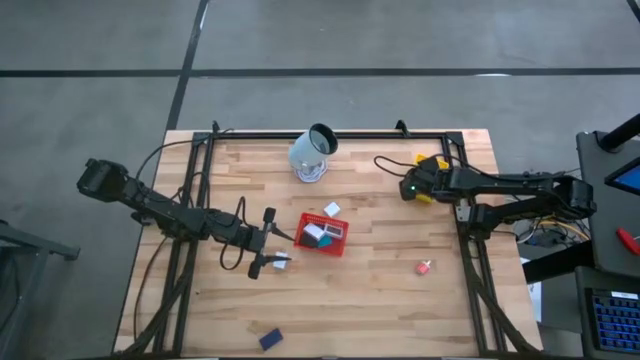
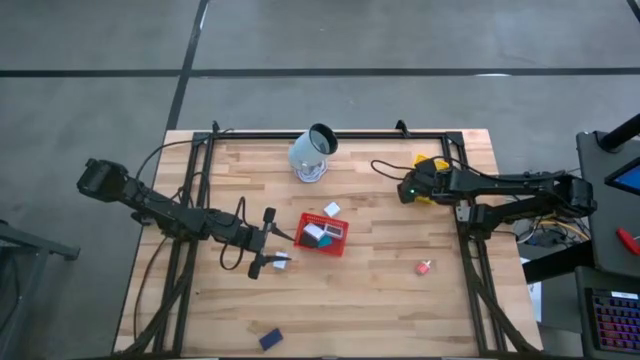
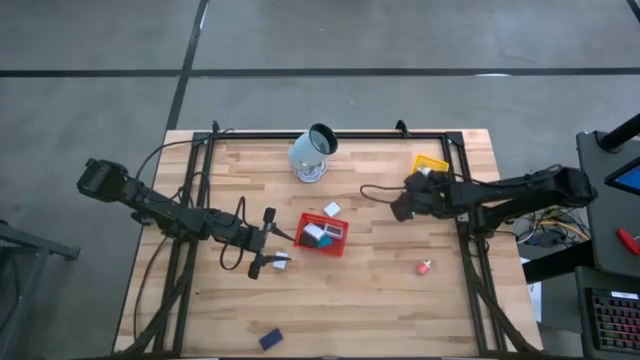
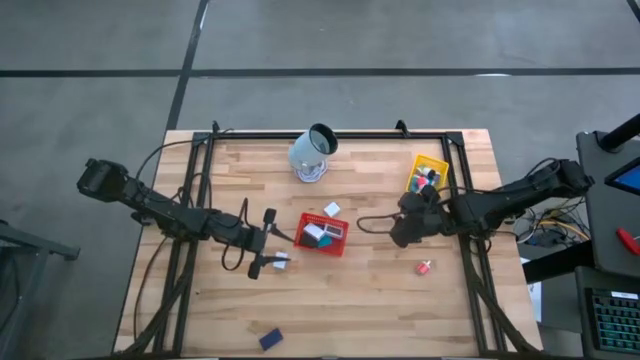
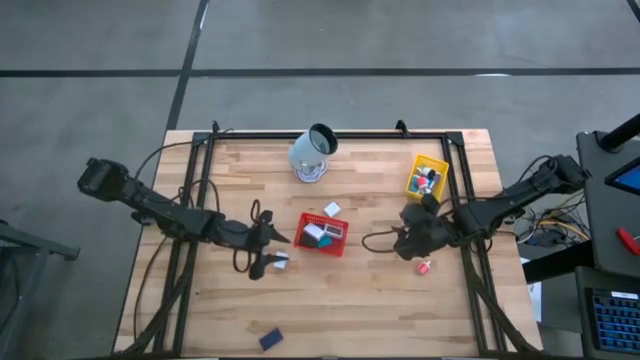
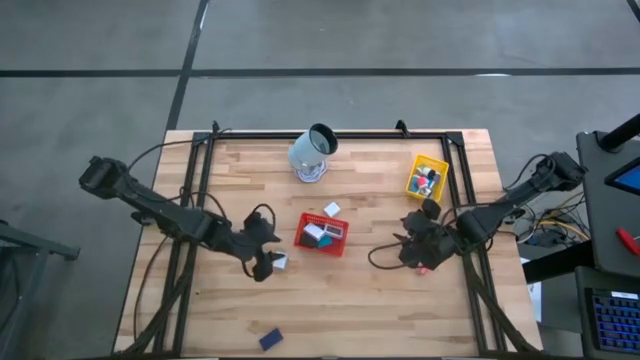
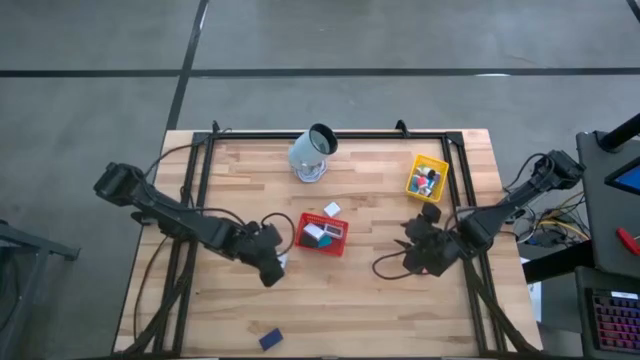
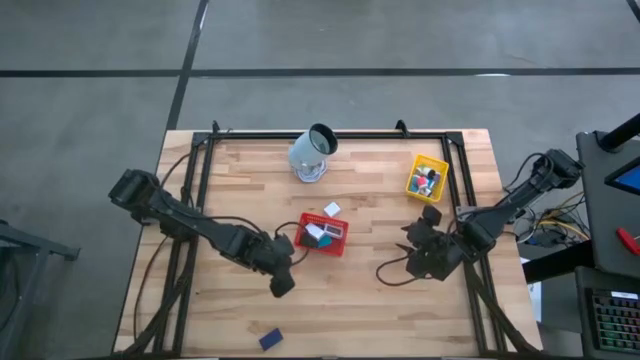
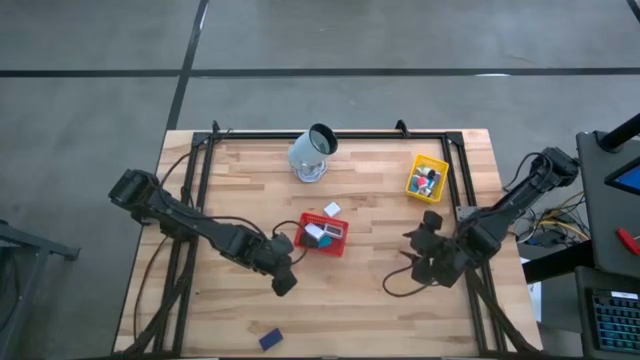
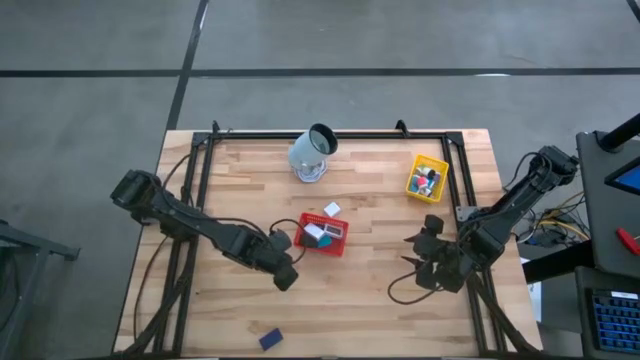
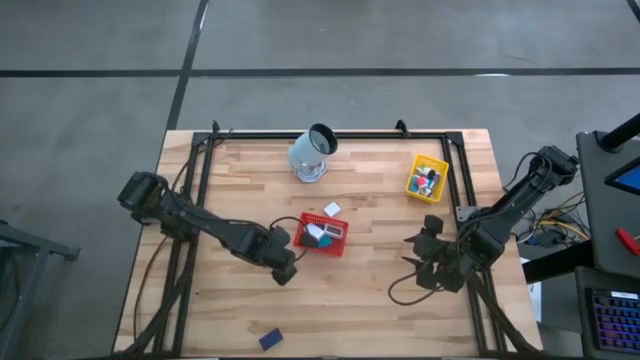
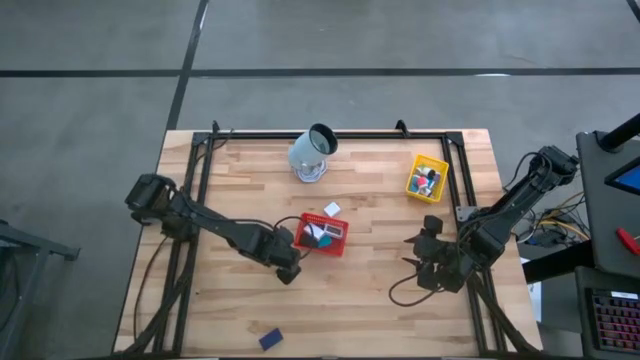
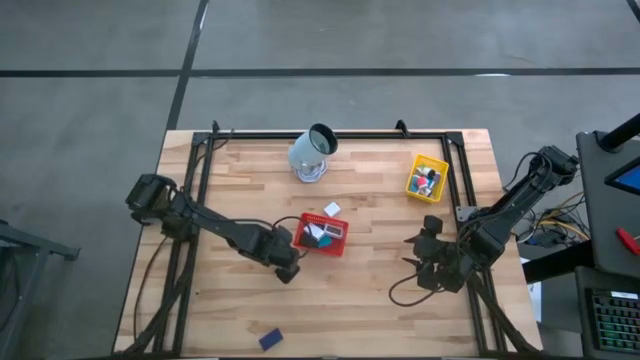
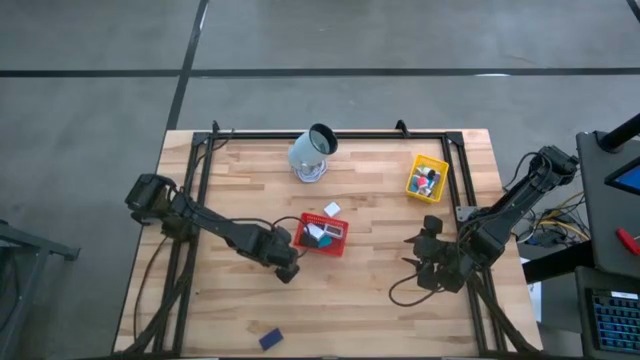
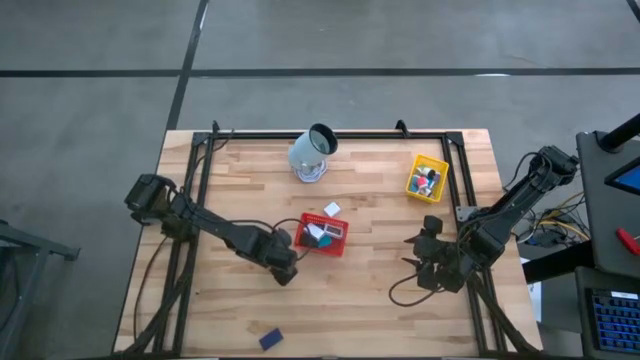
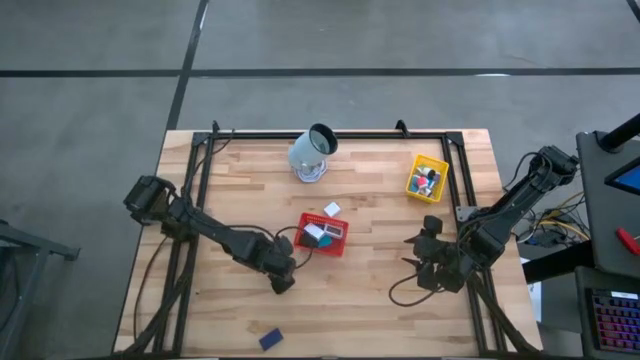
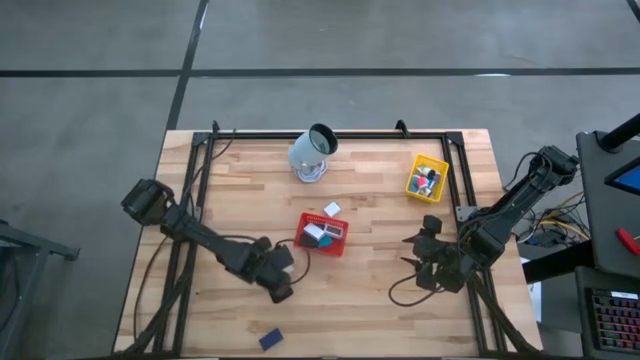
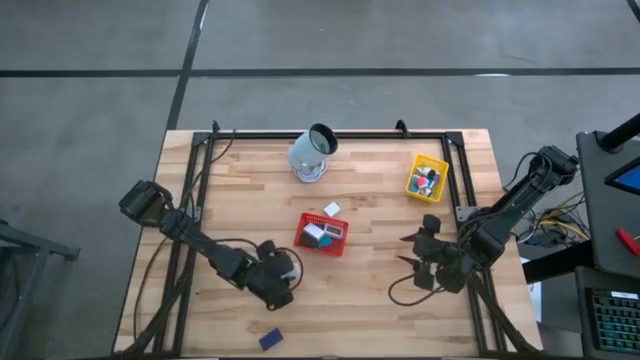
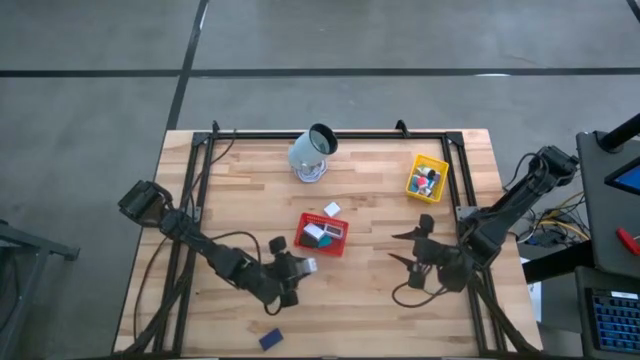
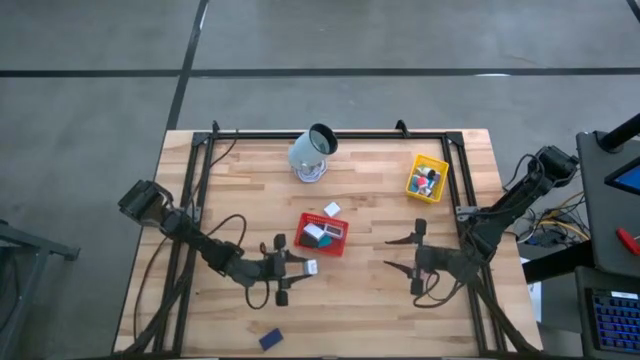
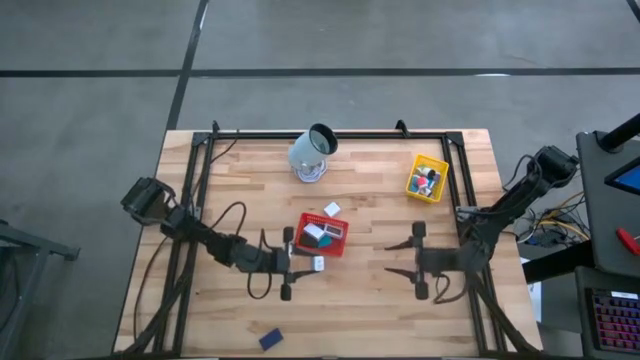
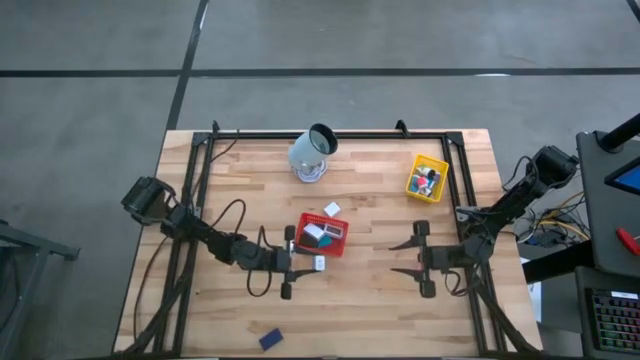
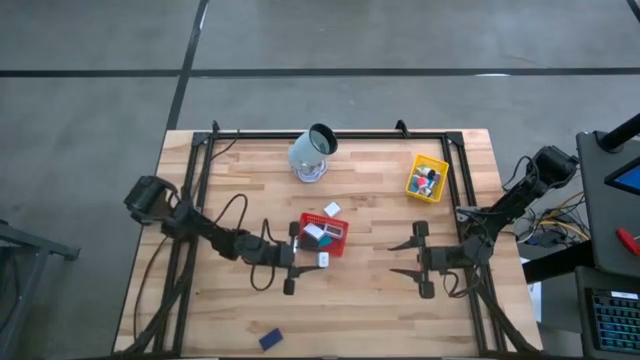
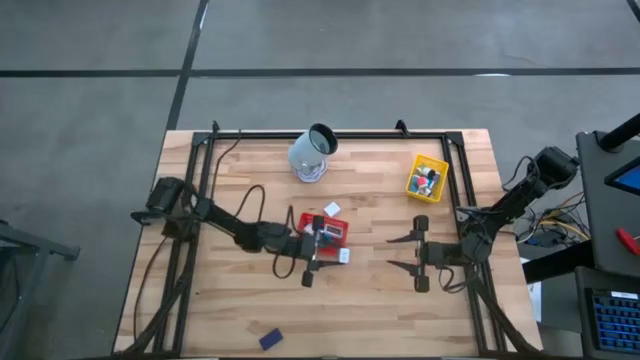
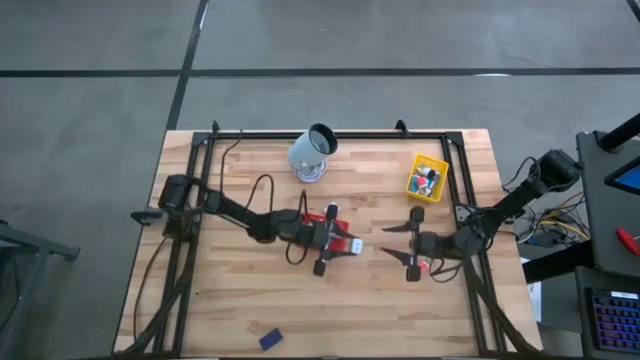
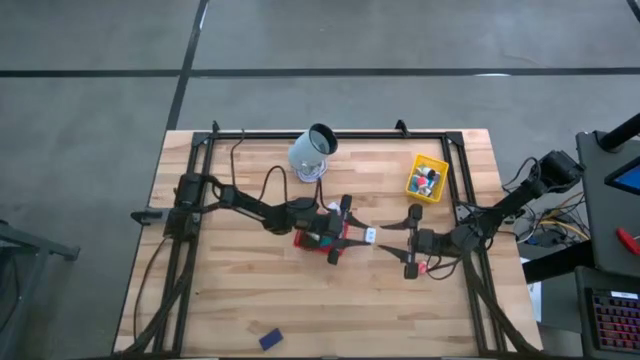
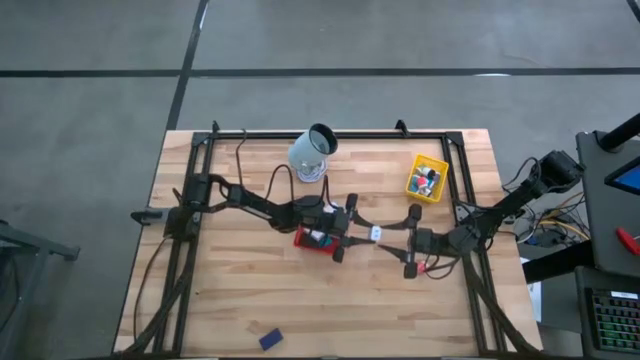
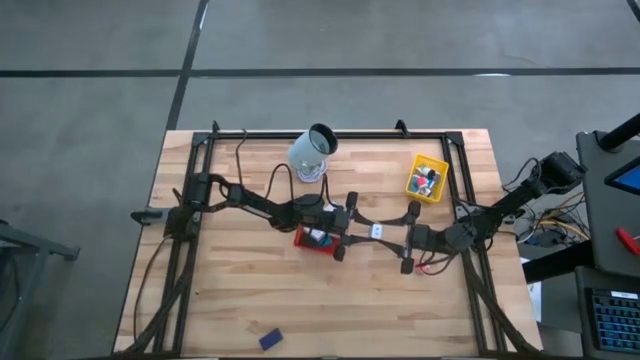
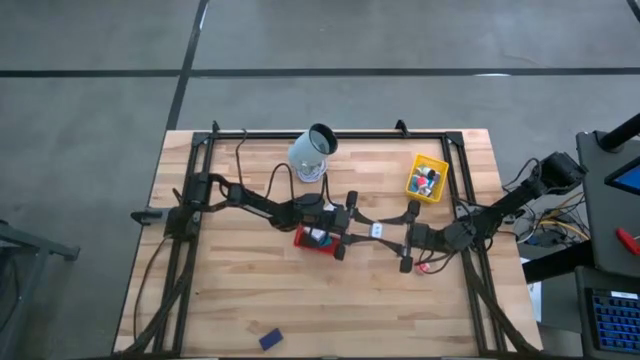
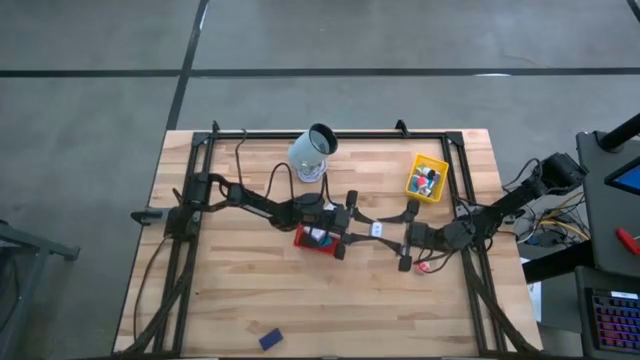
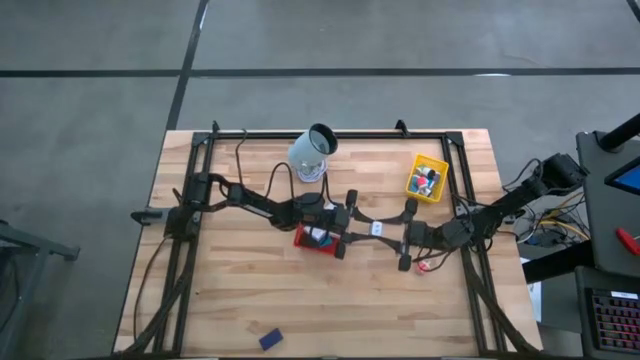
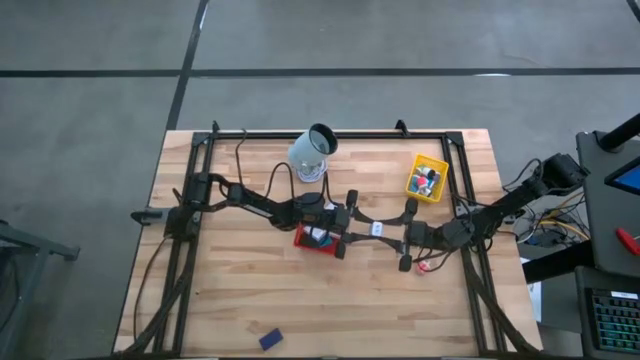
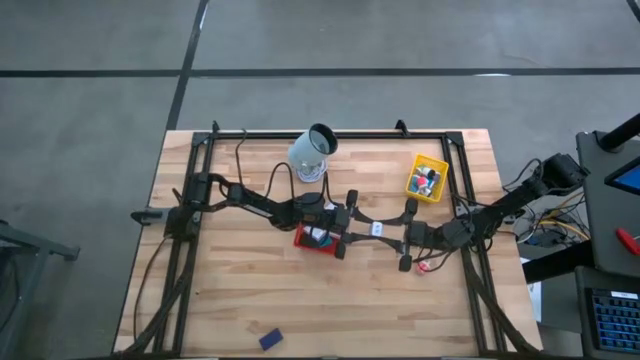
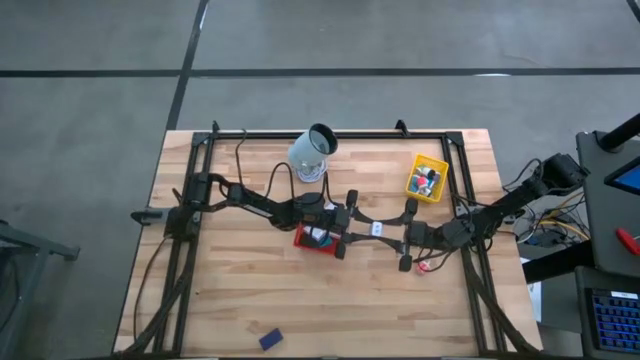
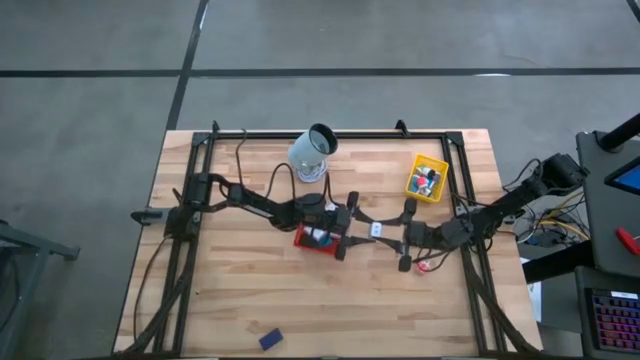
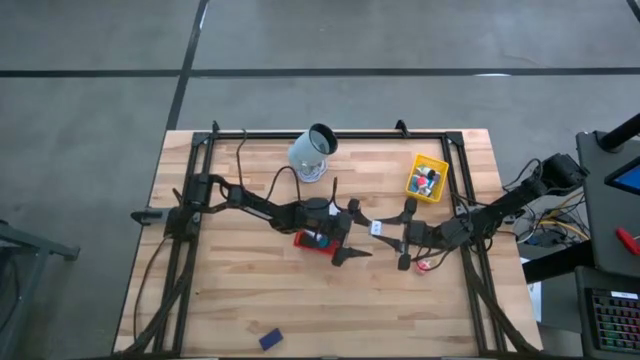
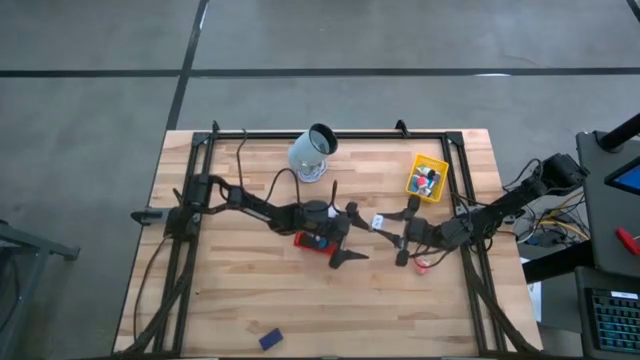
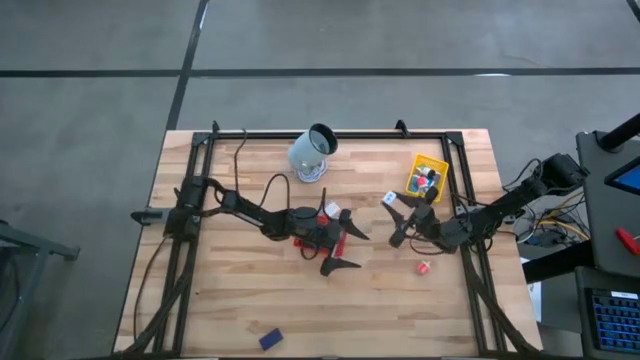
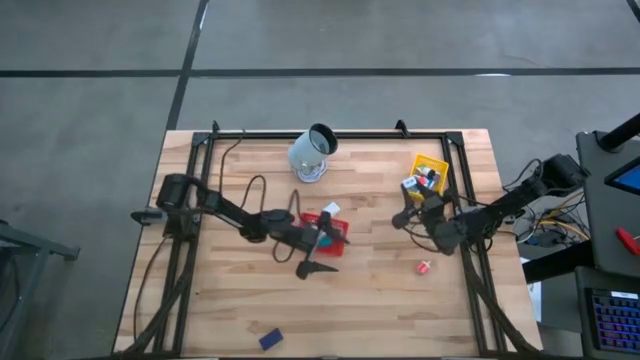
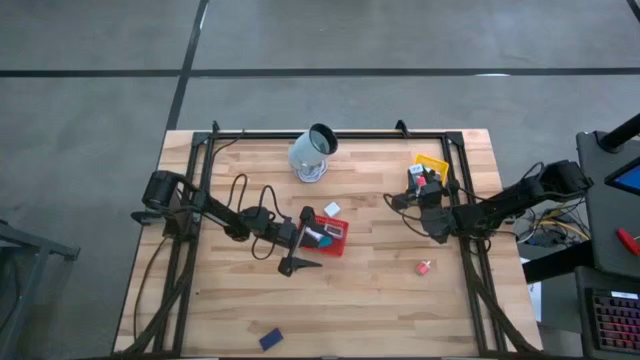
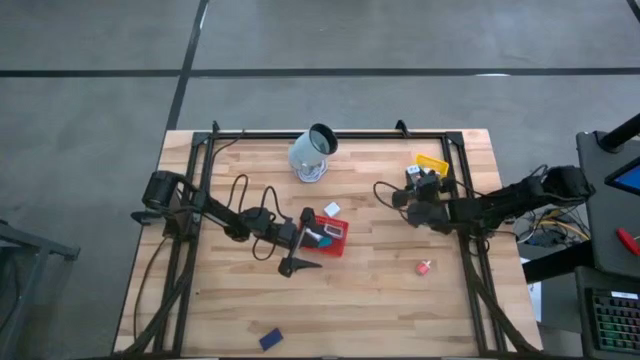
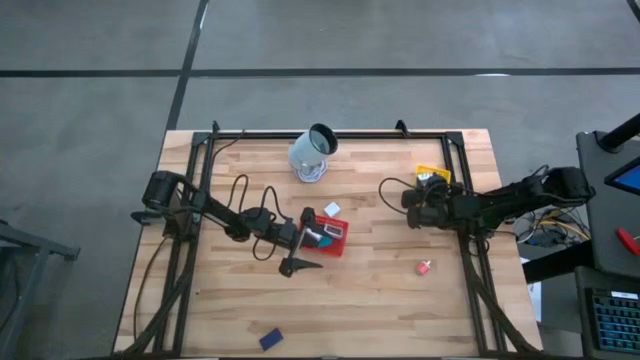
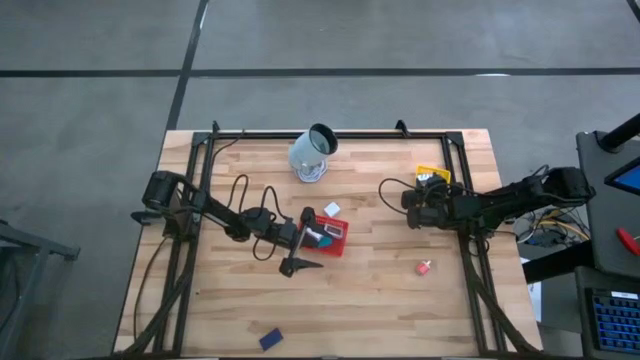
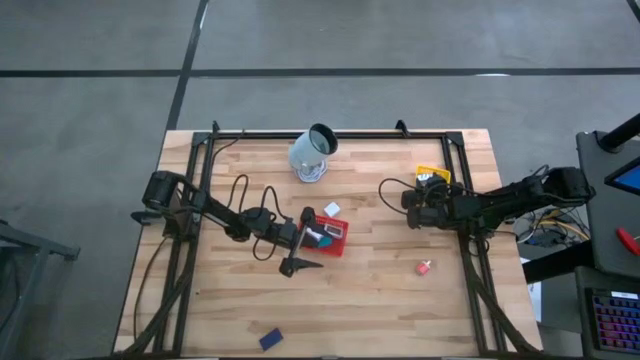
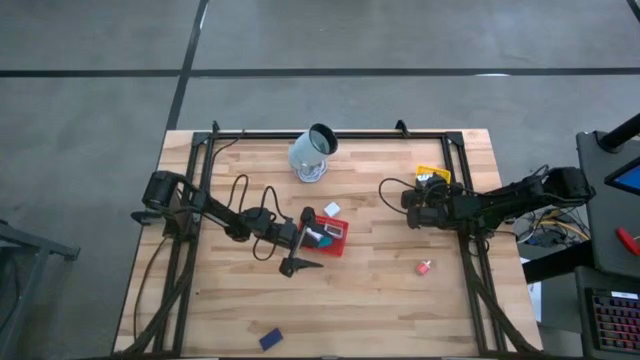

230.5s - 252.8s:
Task: Pick & Place Office items
Put the bottom white charger adapter into the yellow basket
